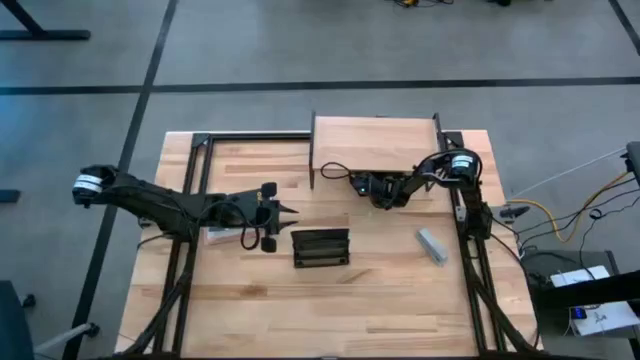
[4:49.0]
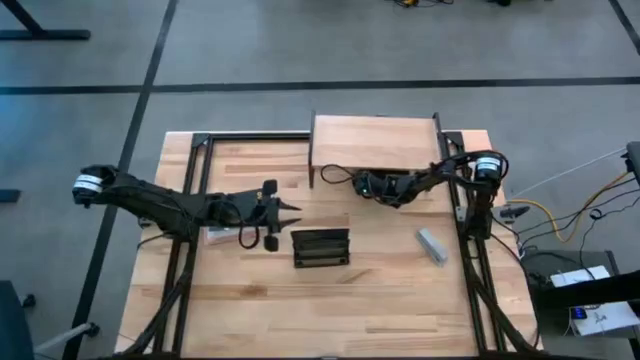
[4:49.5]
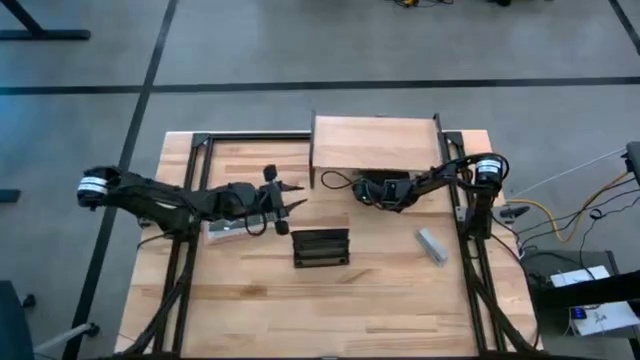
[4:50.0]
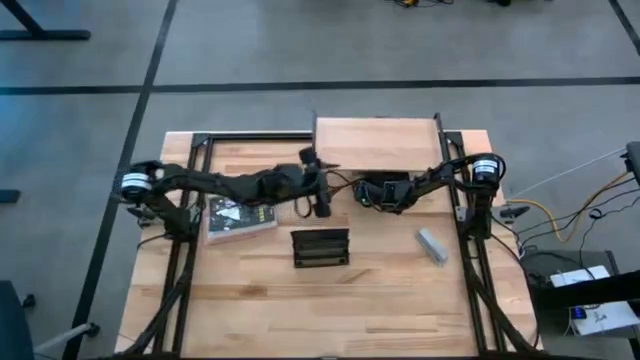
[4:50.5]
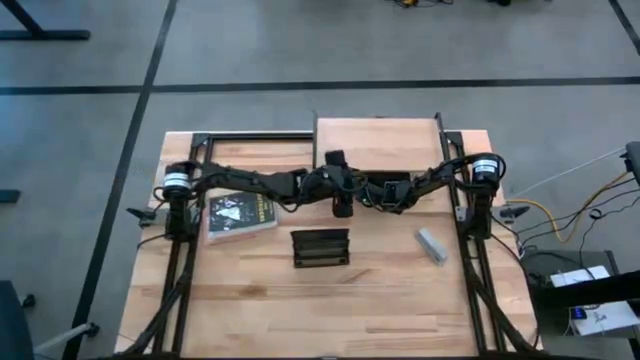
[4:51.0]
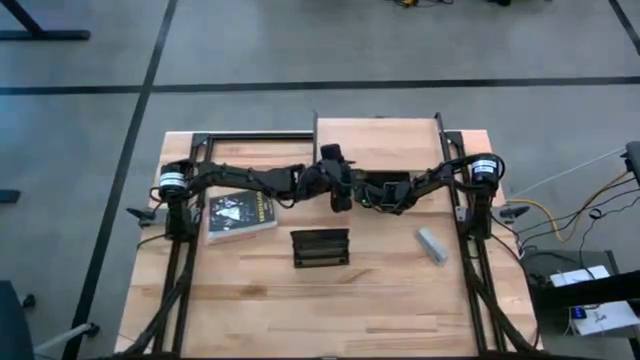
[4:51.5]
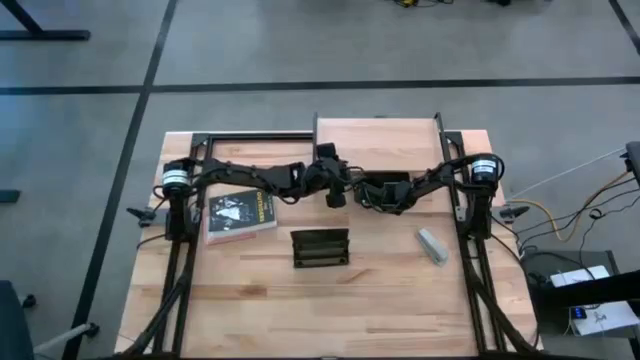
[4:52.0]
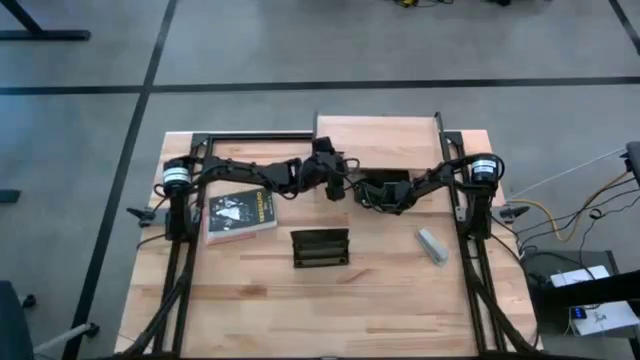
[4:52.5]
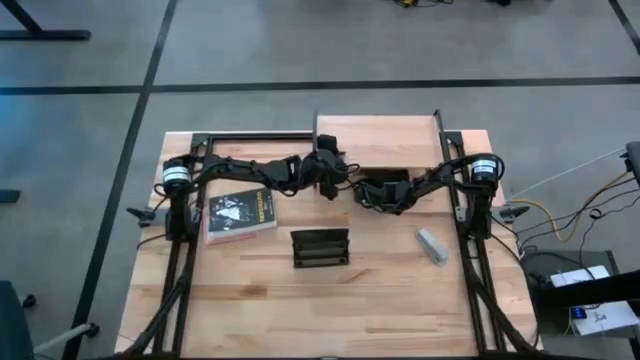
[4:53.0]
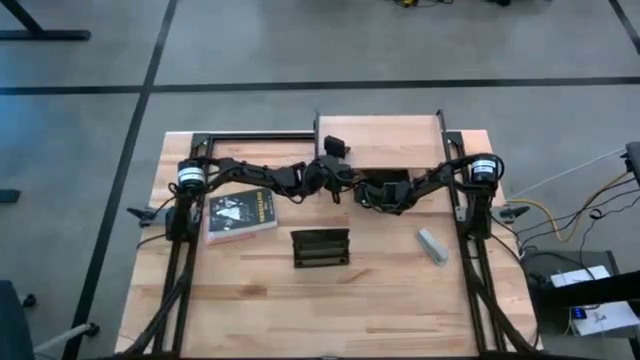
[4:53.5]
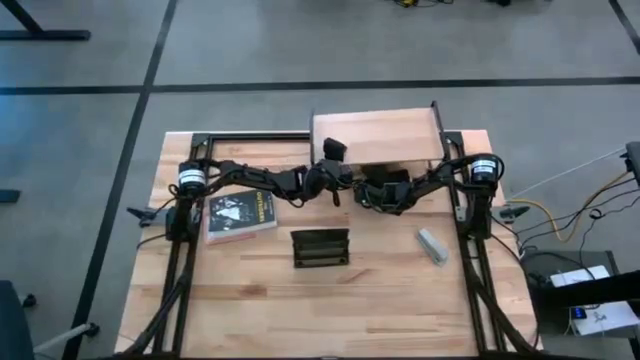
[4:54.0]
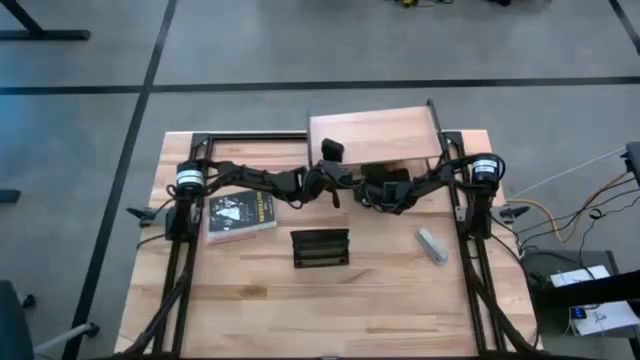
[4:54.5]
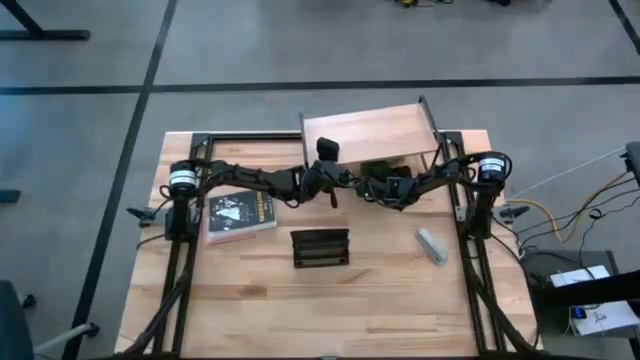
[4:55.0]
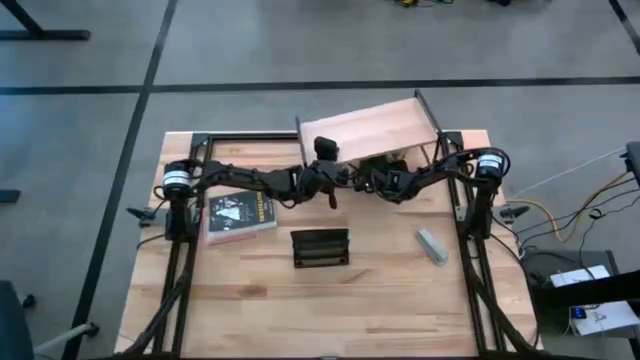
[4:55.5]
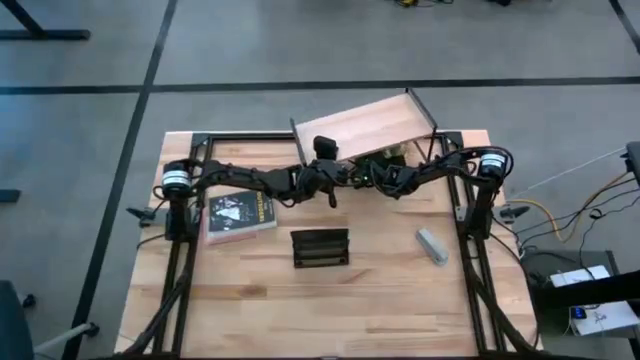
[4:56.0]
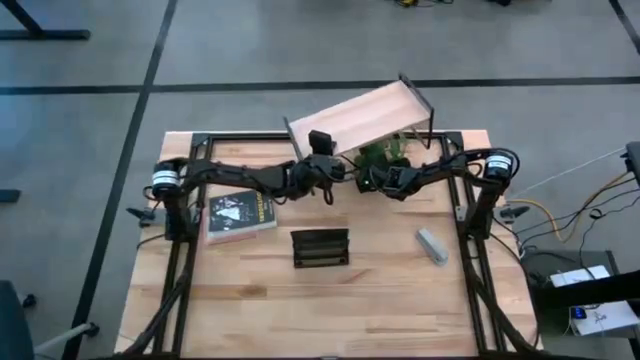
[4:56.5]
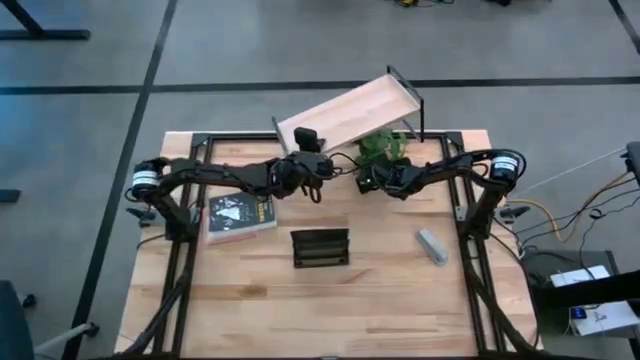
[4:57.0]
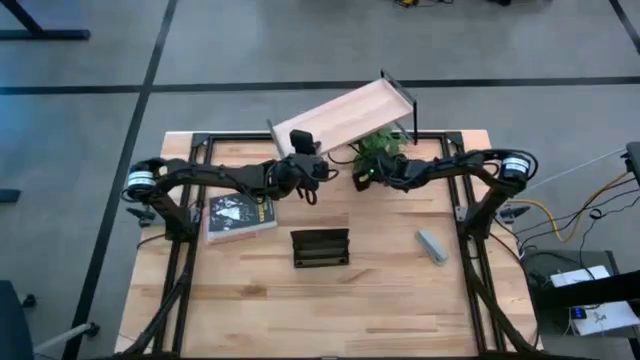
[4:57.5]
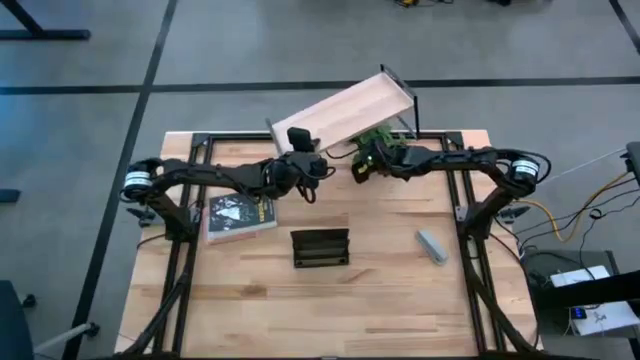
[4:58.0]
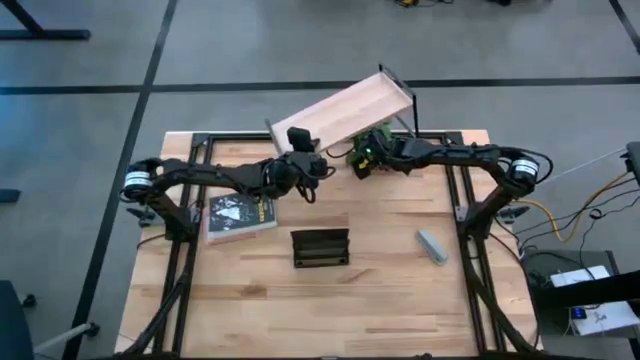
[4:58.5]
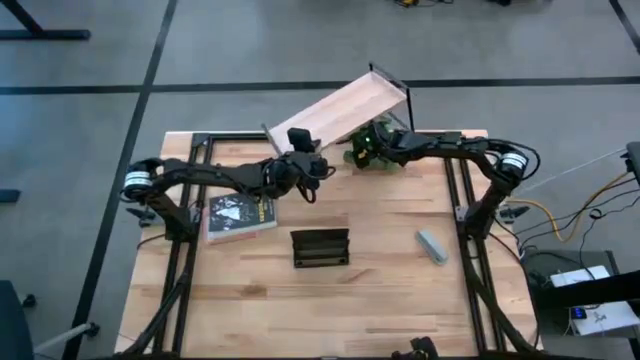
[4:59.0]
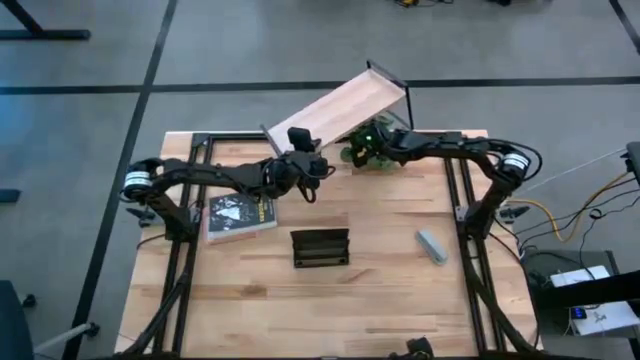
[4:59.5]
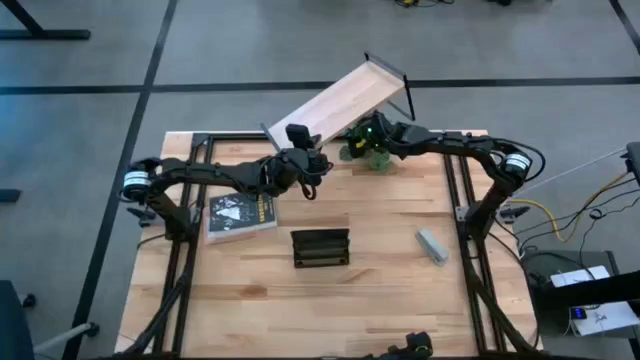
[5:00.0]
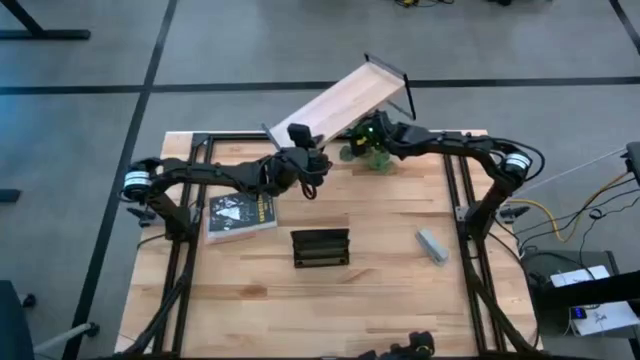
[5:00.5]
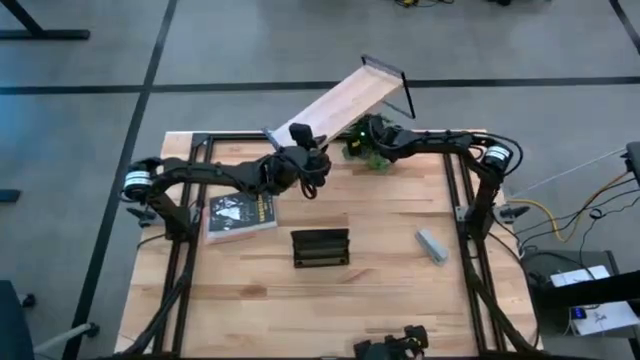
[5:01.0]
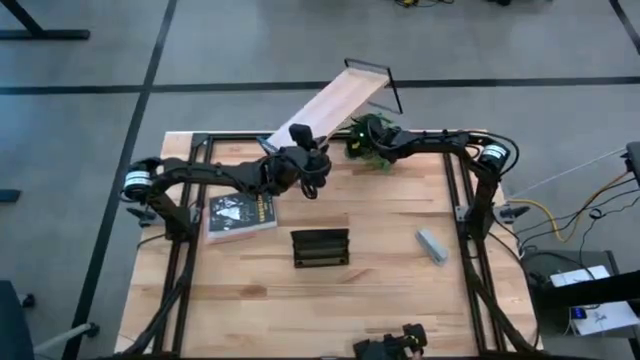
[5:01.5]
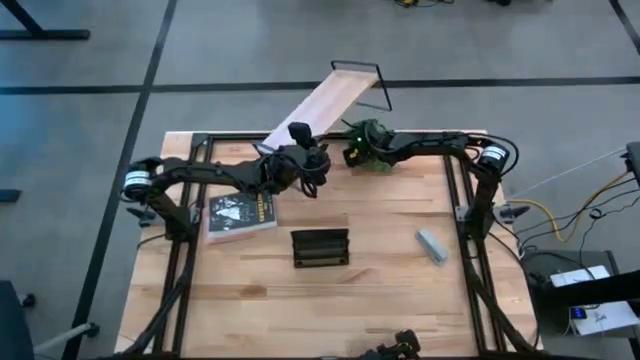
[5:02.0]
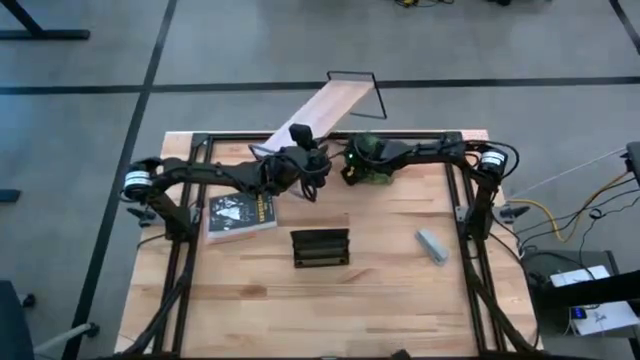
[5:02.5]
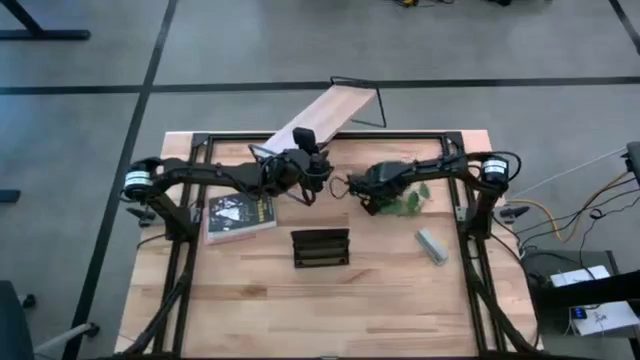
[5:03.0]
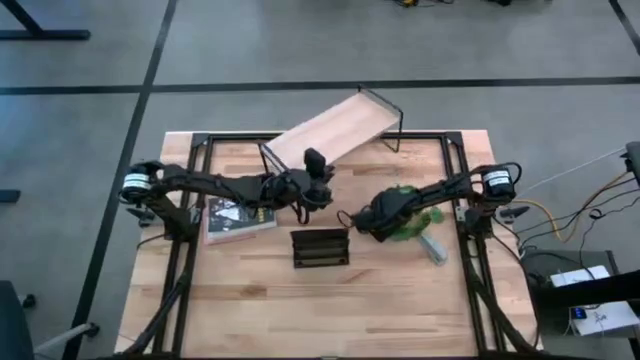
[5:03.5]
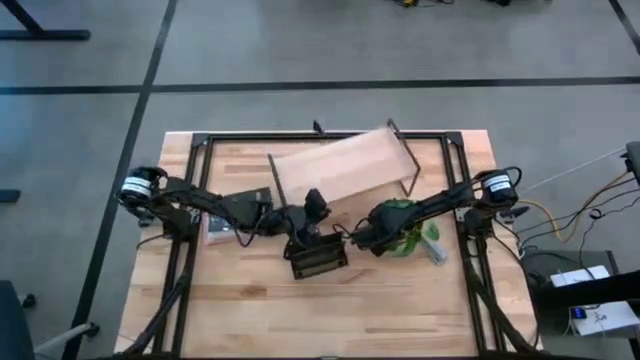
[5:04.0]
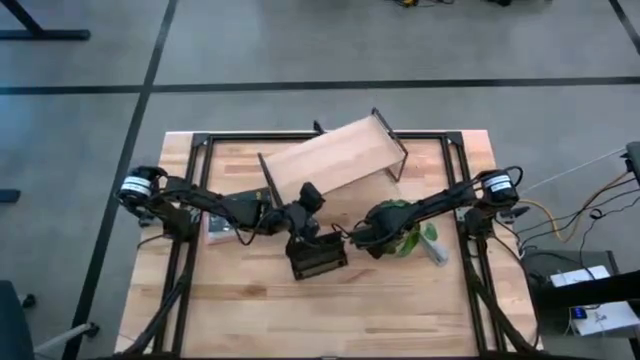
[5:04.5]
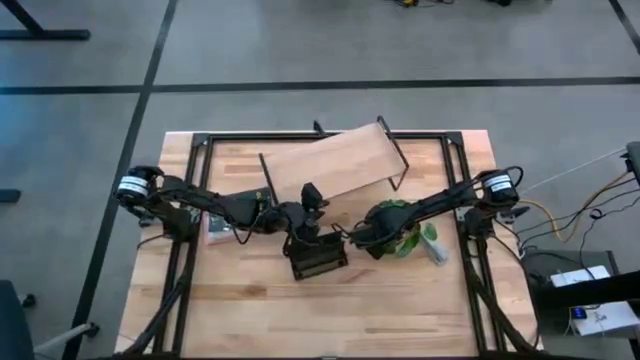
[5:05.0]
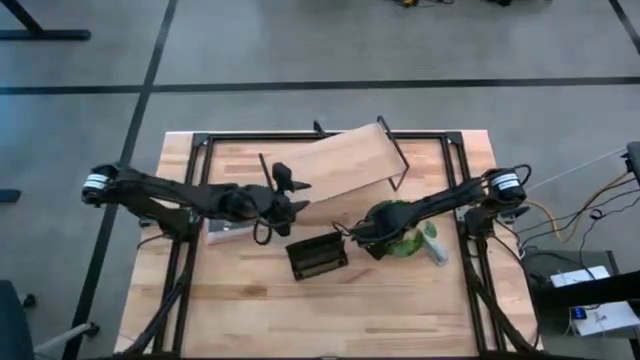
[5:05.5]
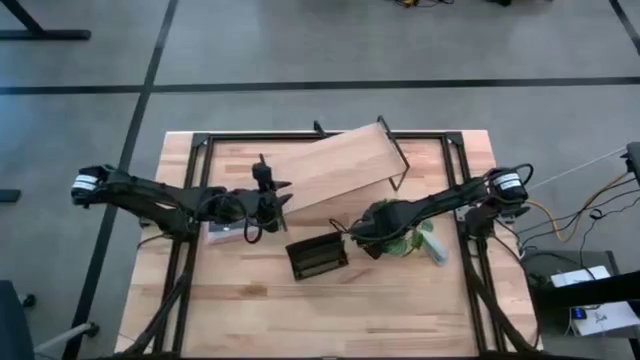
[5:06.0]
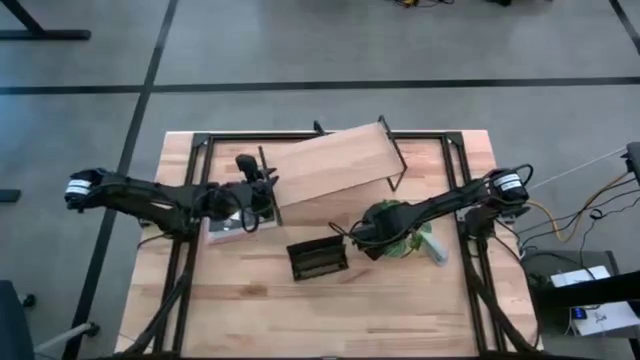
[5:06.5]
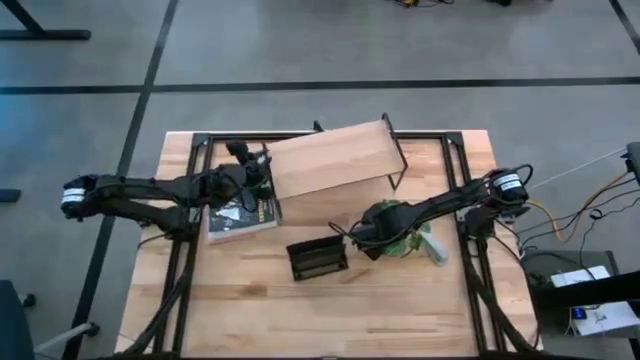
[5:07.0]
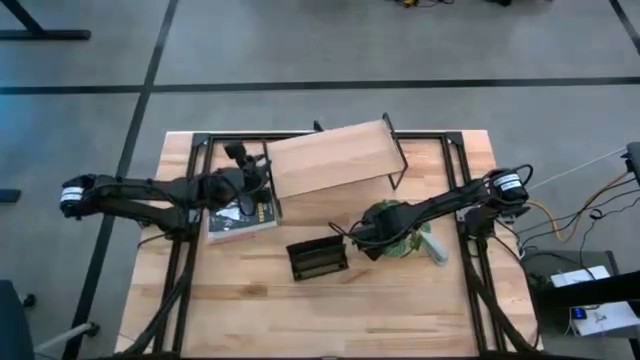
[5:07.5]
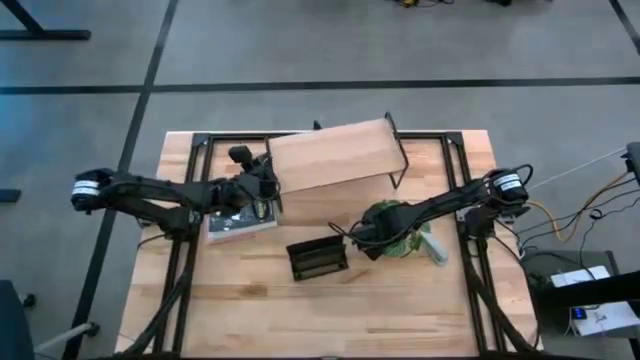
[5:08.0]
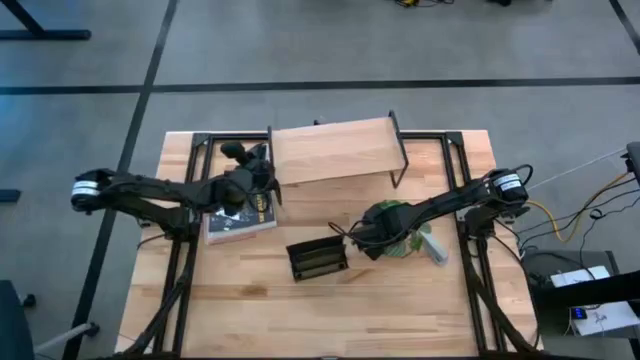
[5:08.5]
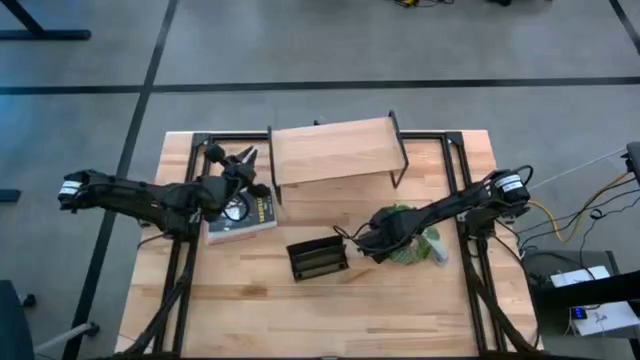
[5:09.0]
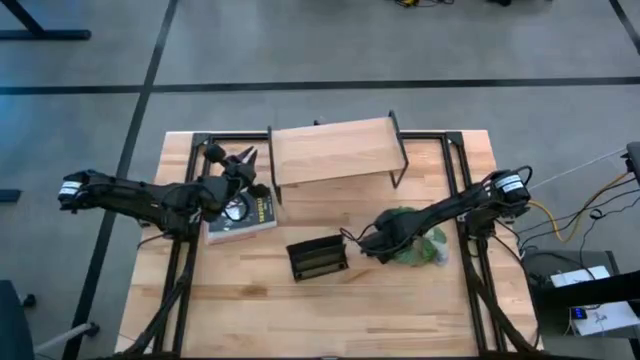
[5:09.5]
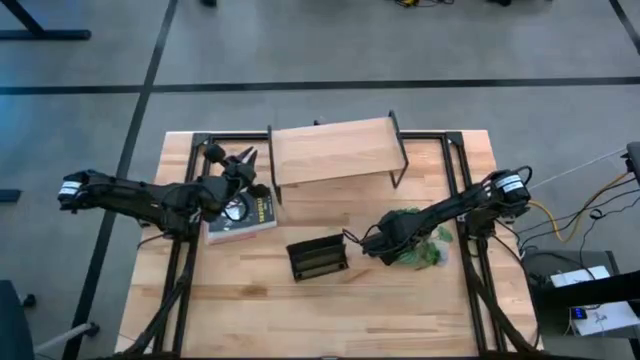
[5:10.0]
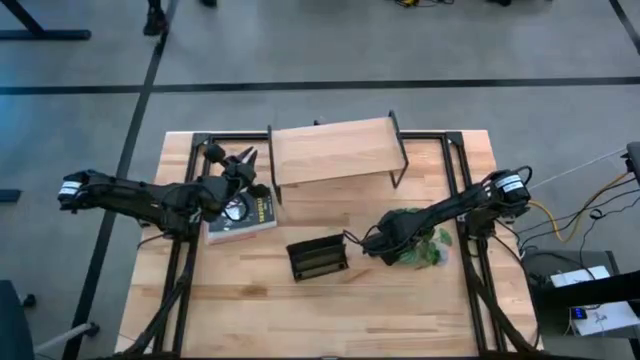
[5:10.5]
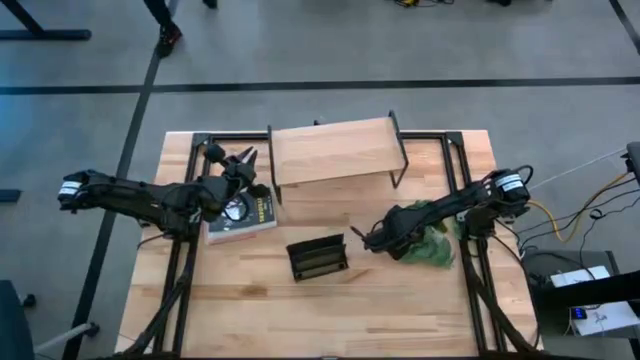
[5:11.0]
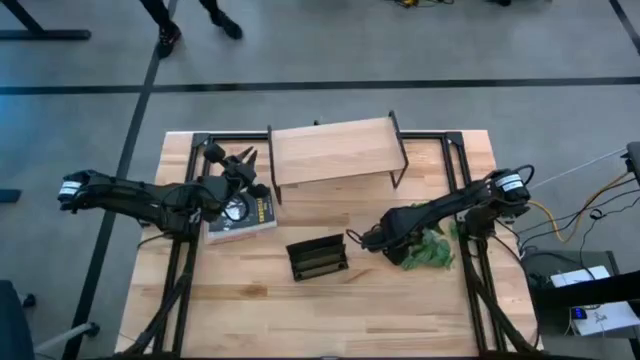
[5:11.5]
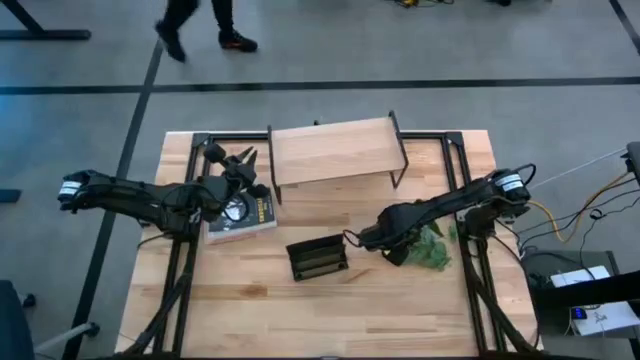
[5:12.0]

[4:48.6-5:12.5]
Task: Stock shelves
Move the white vase plant to the middle right of the table
